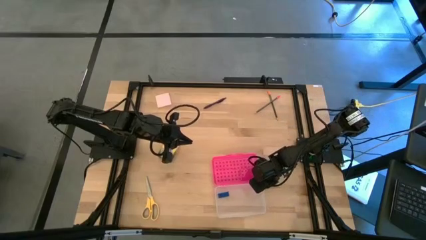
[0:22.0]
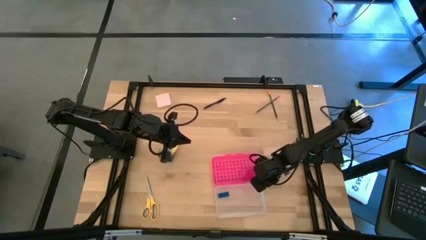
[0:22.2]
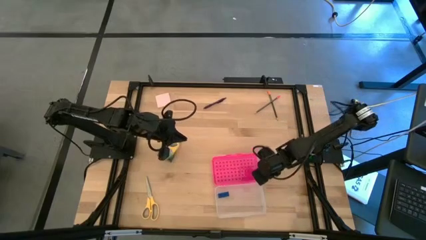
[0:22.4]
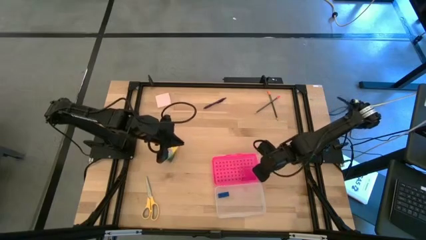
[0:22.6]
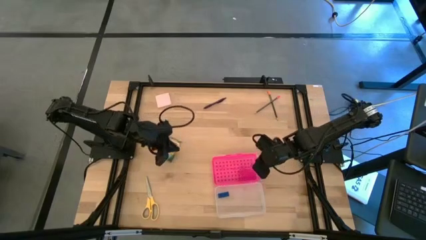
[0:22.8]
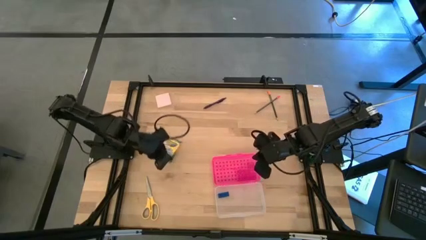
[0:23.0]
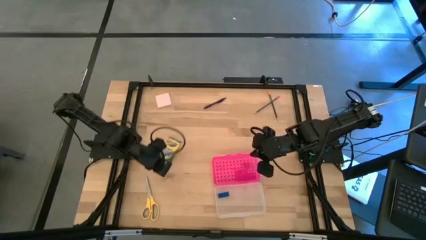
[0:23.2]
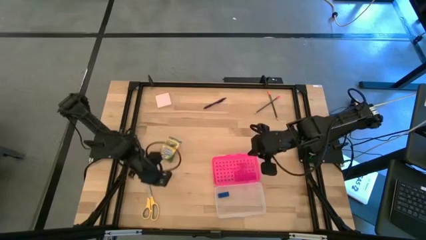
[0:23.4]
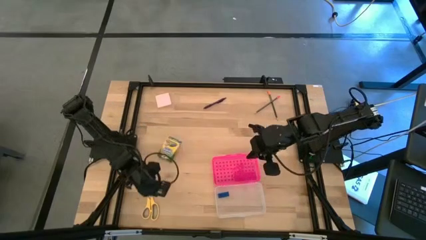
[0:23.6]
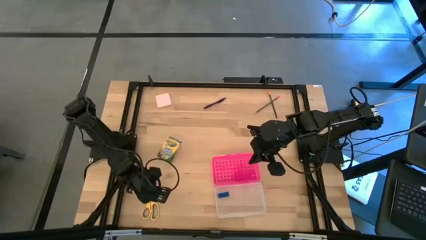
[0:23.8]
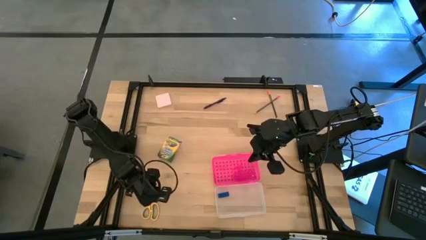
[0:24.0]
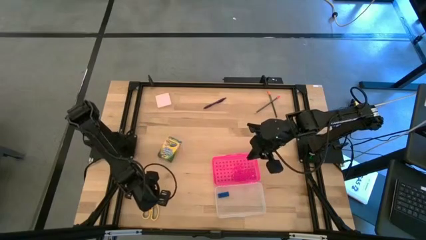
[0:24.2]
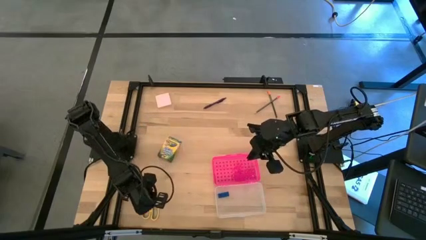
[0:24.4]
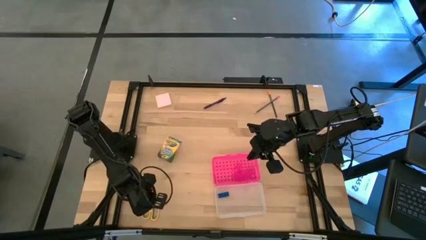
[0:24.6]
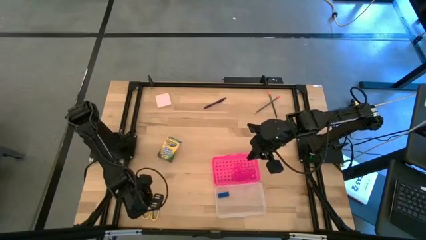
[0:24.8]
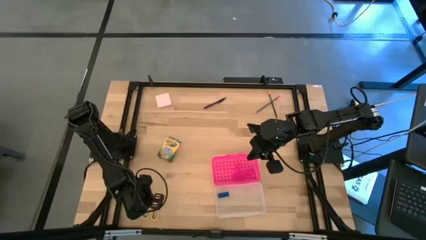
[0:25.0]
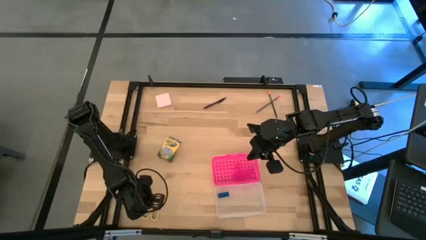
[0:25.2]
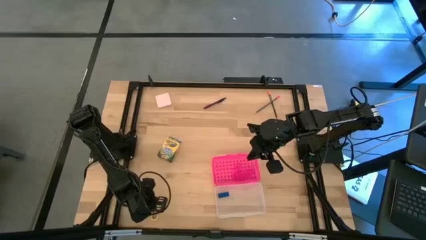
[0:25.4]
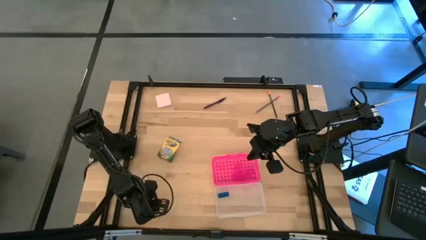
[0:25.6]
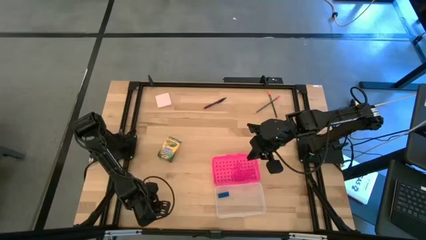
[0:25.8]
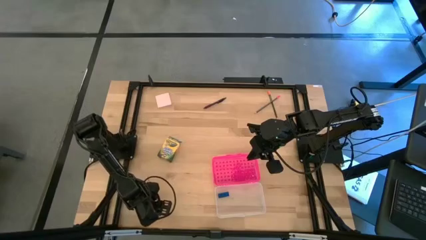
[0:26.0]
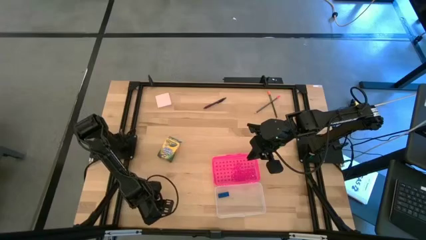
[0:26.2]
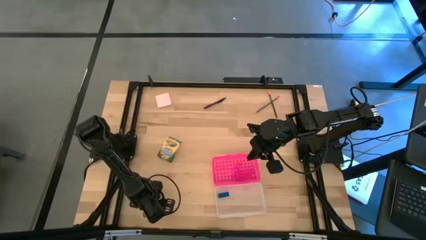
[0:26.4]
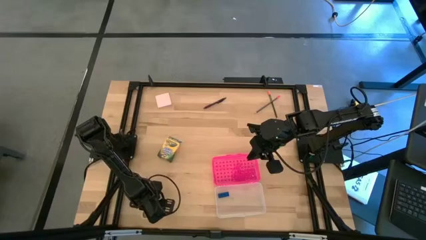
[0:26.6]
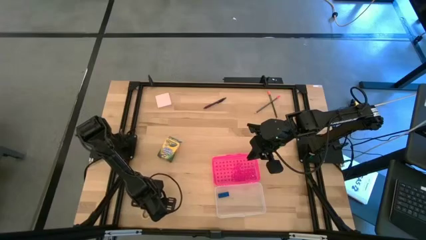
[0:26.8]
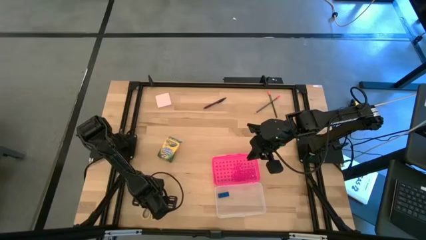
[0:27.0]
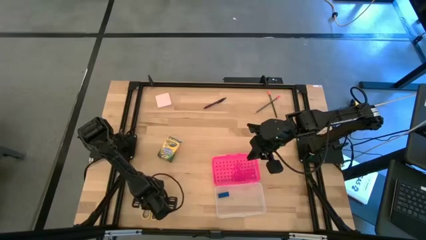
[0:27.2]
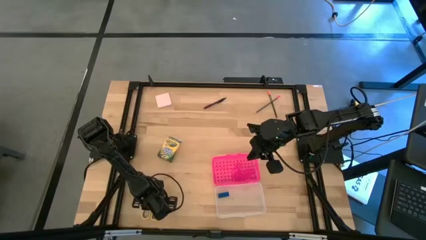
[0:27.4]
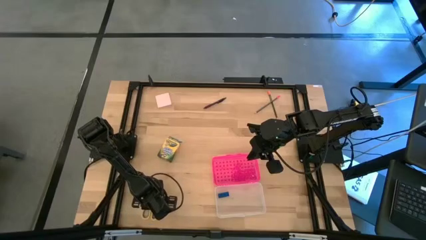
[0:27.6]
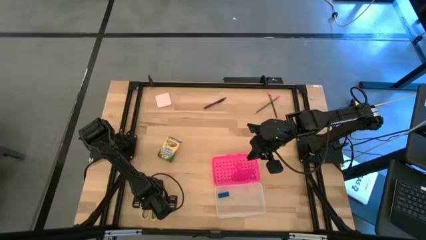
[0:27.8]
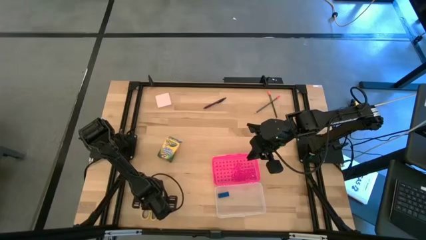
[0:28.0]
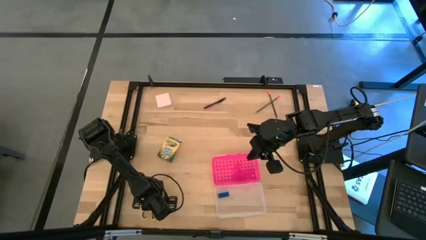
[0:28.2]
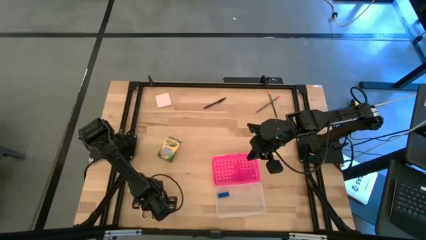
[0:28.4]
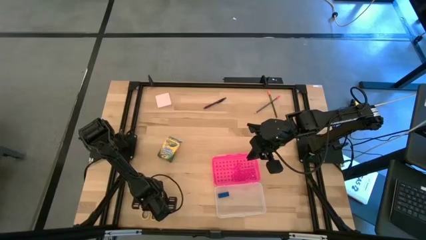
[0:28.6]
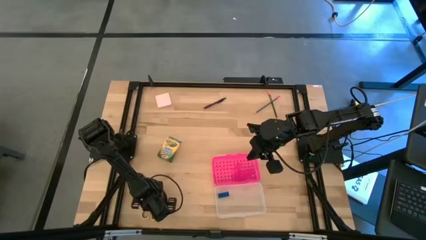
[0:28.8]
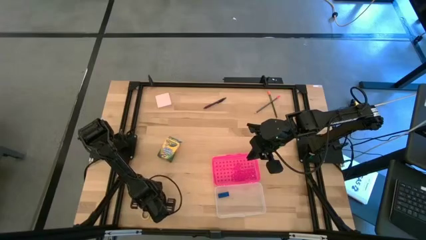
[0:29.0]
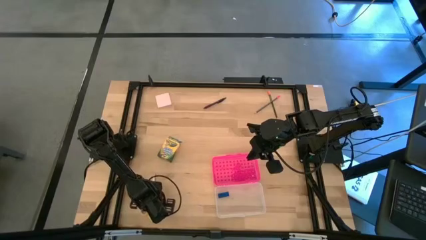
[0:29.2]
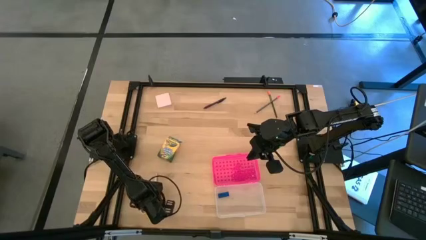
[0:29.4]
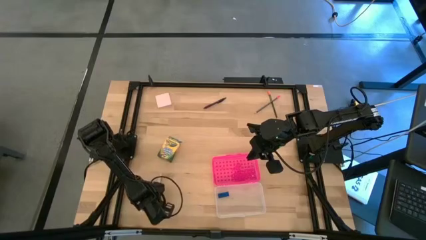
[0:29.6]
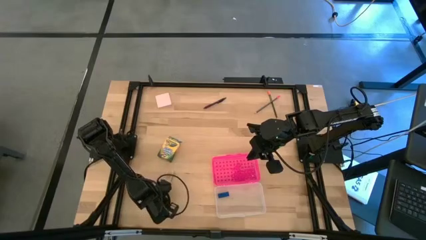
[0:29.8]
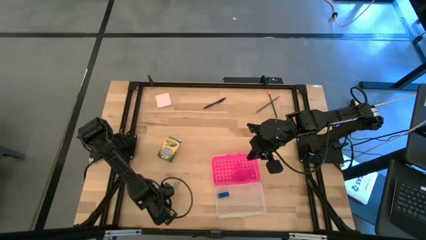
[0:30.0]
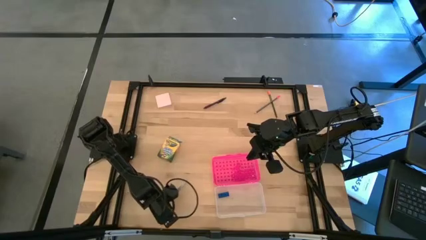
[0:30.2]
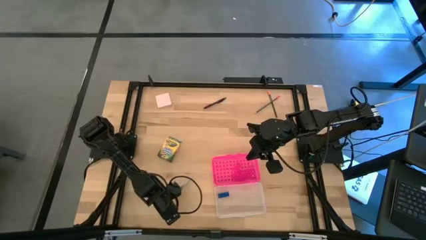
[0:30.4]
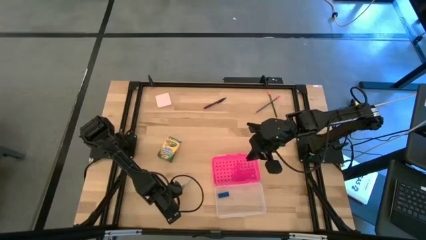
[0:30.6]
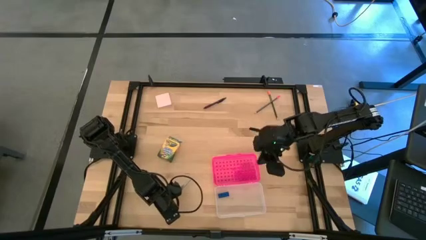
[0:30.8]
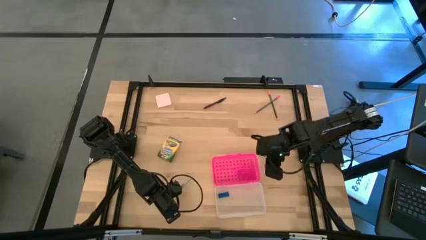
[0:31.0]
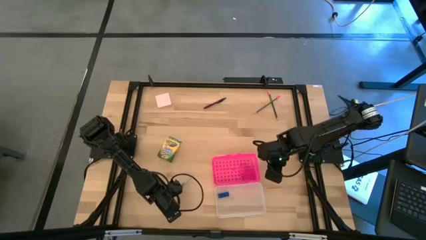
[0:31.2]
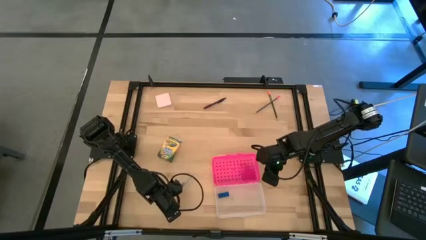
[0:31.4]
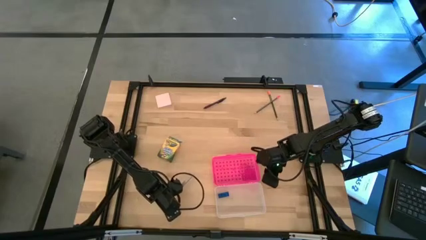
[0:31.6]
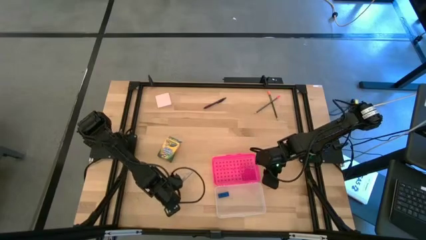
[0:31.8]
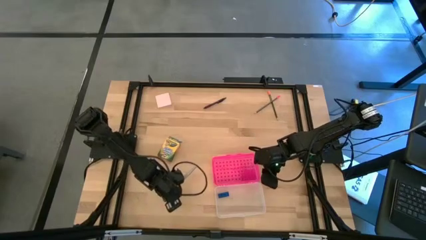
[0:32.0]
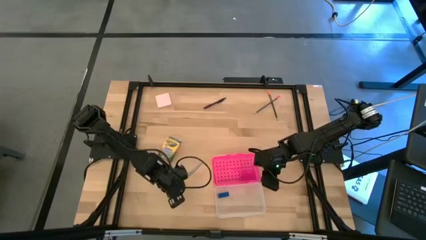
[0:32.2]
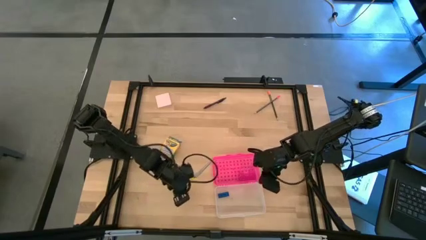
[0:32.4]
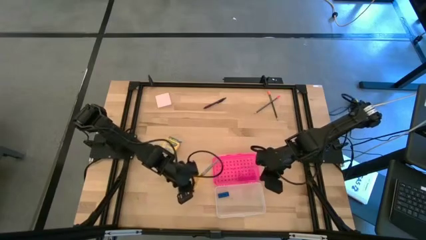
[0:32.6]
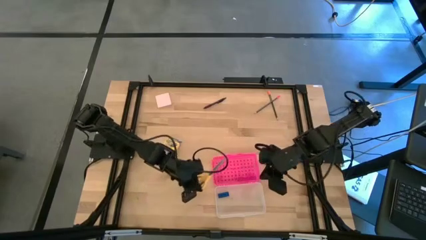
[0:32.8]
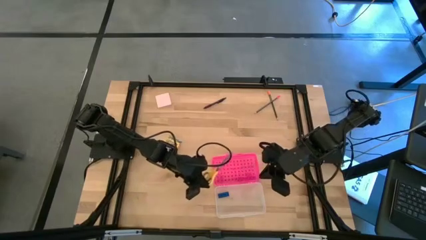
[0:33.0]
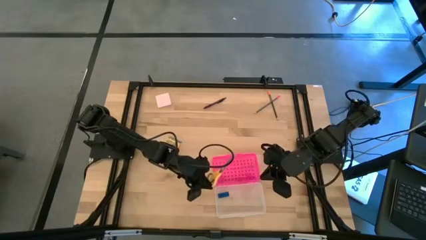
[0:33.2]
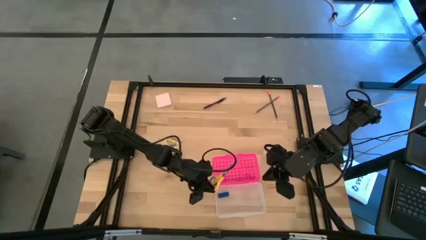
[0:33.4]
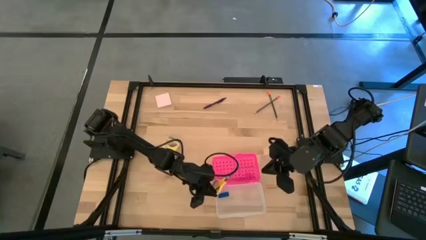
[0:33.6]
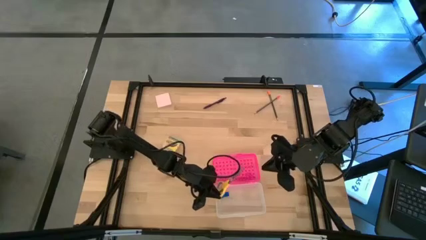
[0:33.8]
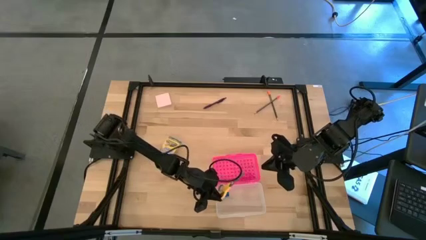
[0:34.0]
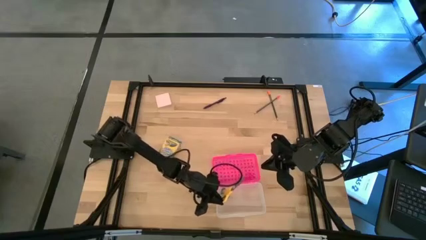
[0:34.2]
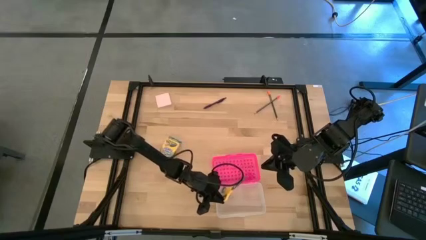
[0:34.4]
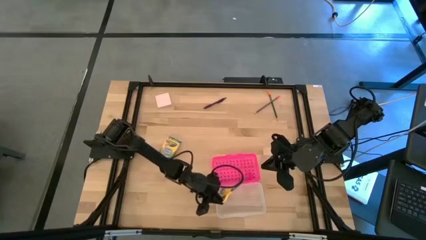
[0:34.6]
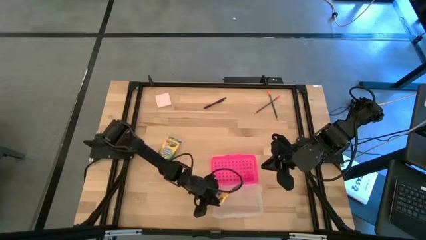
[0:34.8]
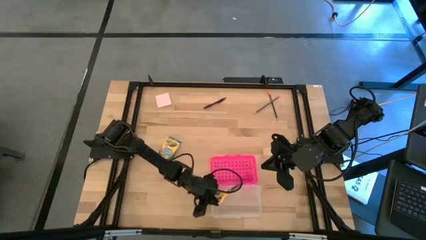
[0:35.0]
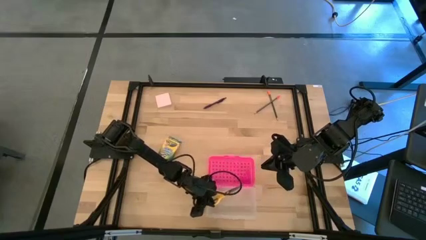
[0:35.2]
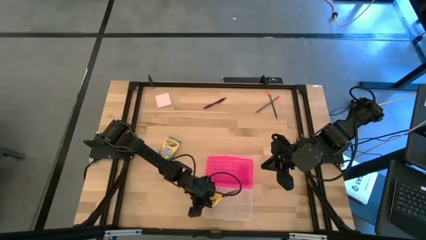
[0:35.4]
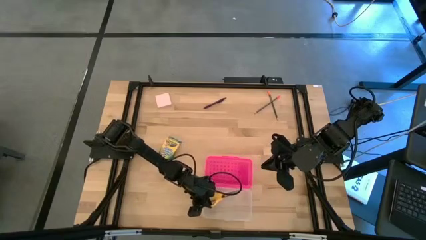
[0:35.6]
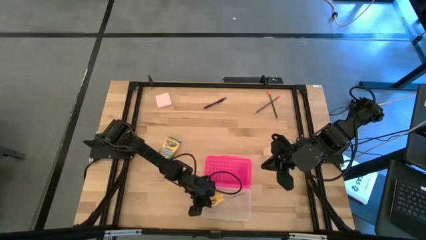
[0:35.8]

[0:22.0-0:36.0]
Task: Pack school essentials
Put the yellow scissors into the pink box

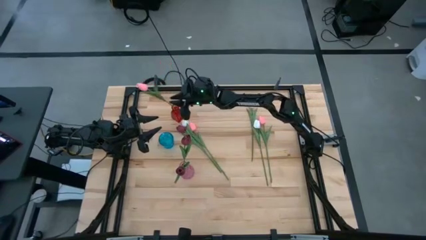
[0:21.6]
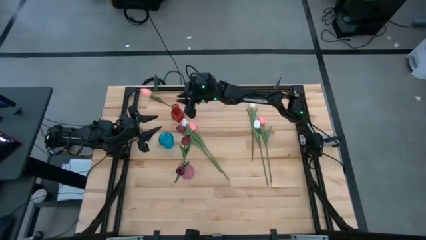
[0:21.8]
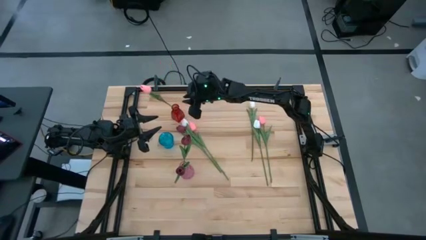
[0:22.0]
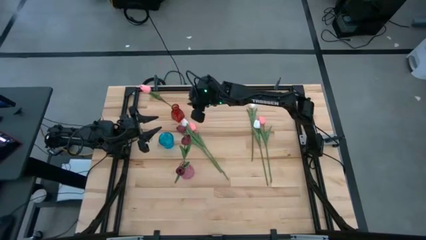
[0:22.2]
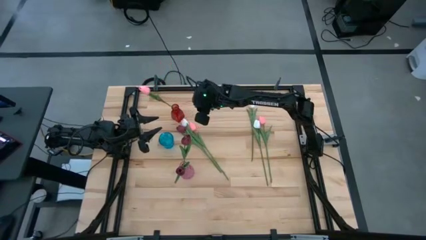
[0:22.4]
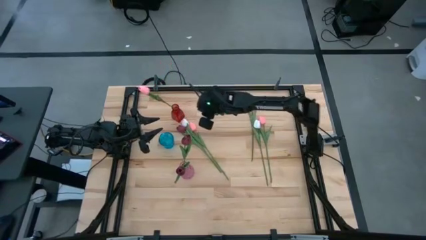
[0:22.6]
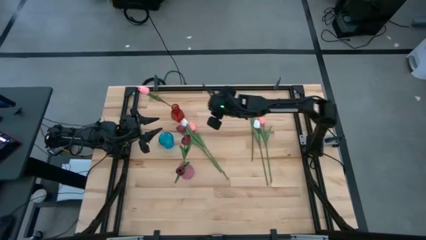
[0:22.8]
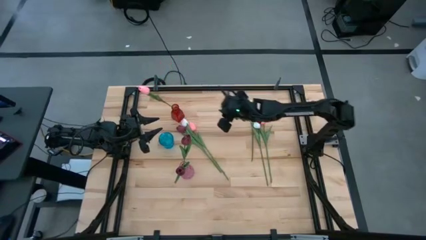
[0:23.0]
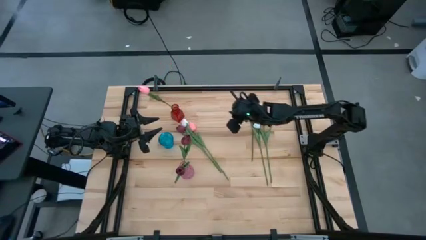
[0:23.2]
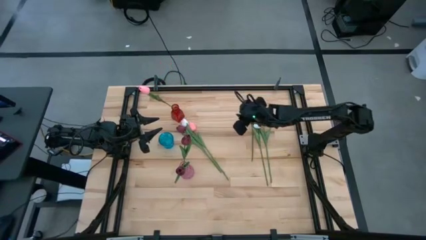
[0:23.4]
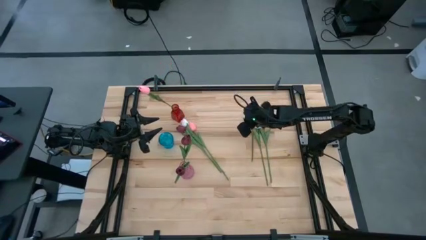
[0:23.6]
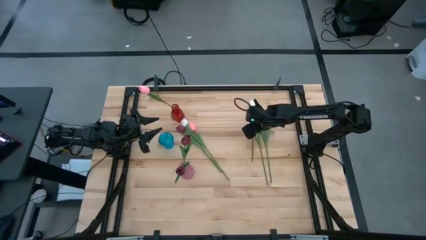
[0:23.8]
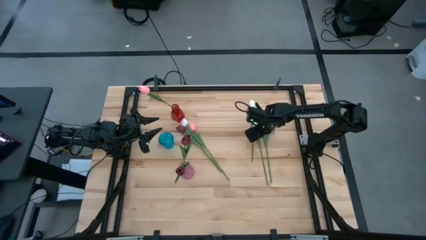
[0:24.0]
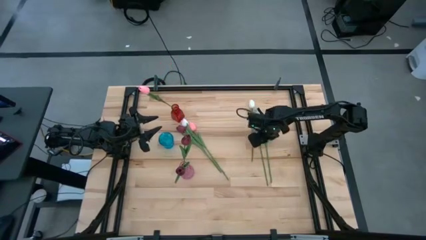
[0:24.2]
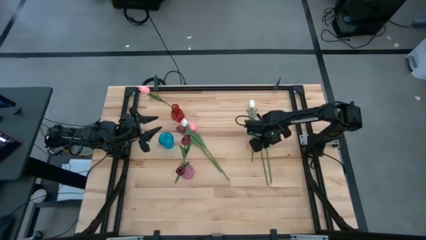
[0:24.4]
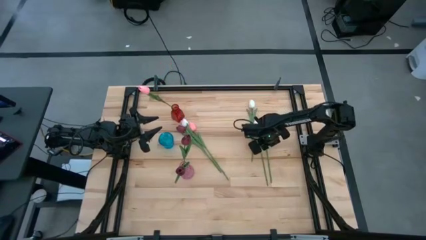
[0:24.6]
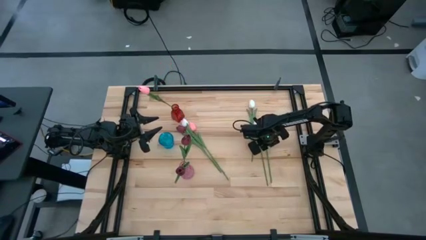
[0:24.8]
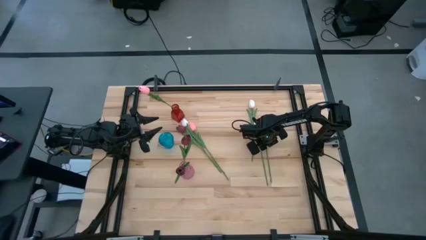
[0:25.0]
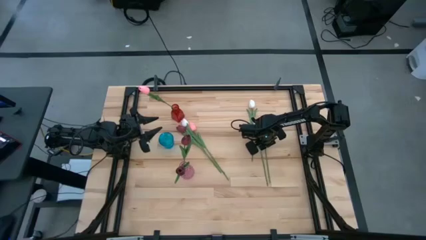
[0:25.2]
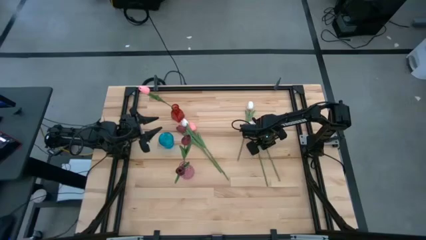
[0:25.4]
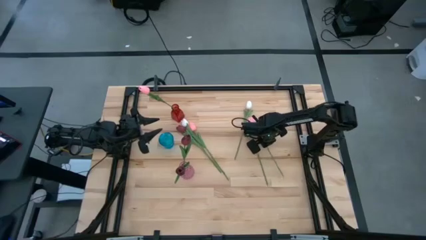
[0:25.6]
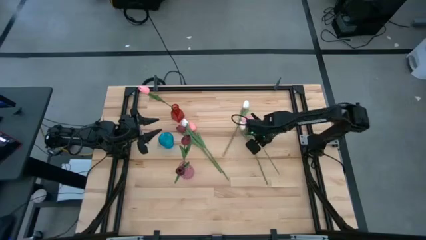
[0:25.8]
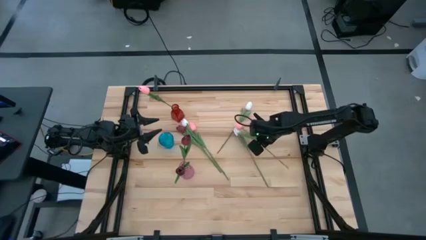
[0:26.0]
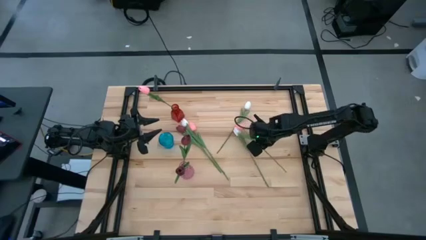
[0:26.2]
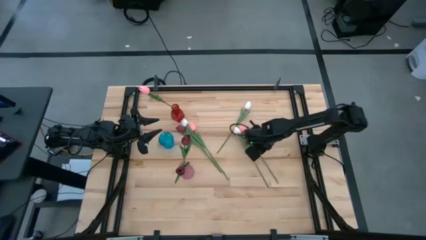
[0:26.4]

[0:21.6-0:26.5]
Task: Sort flowers into vase by color
Put the right pink tulip into the red vase
